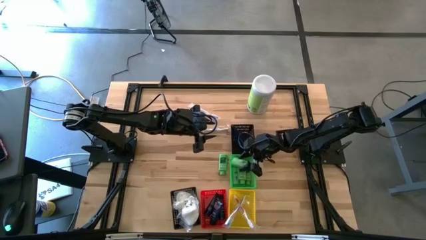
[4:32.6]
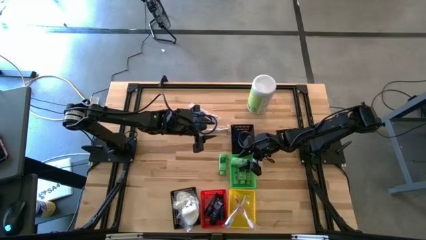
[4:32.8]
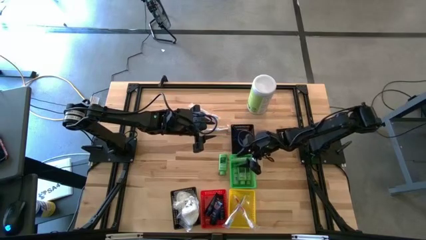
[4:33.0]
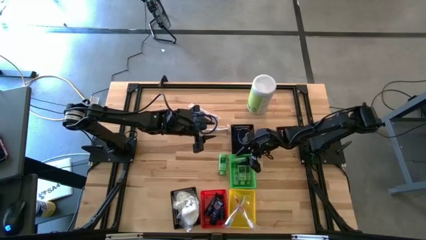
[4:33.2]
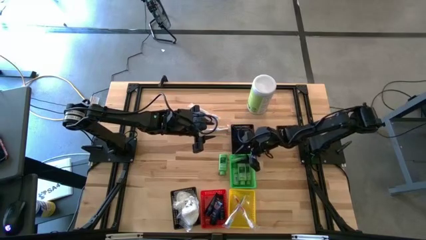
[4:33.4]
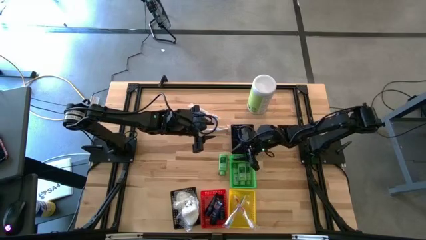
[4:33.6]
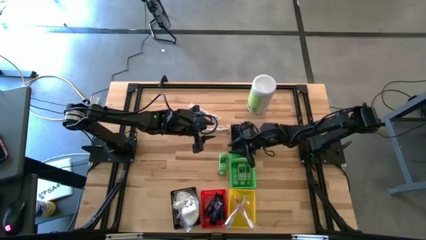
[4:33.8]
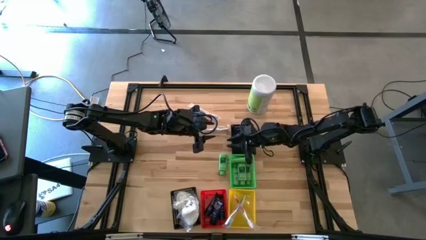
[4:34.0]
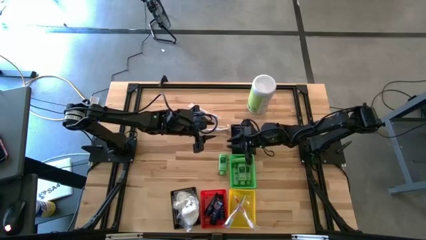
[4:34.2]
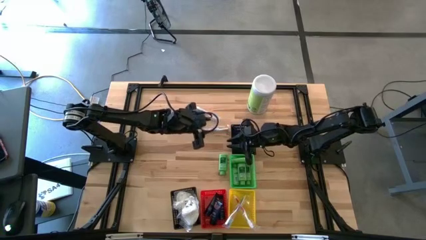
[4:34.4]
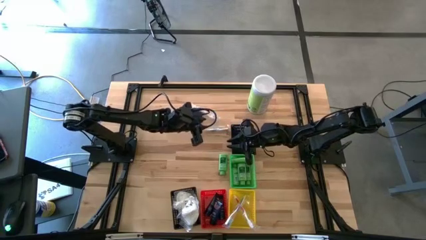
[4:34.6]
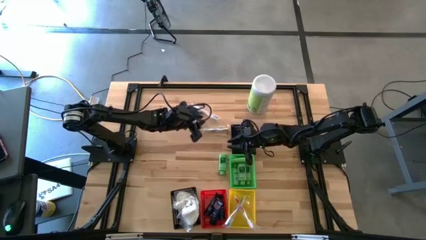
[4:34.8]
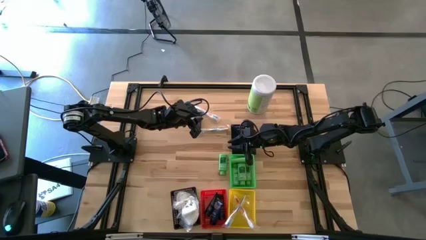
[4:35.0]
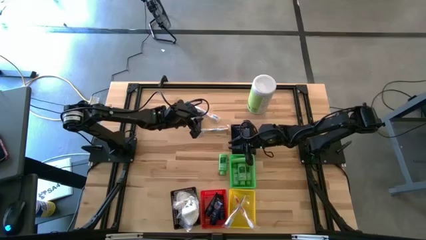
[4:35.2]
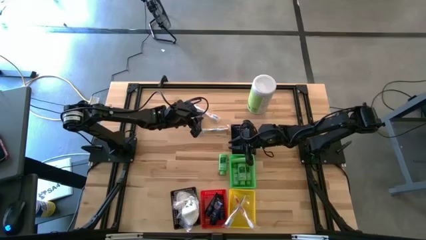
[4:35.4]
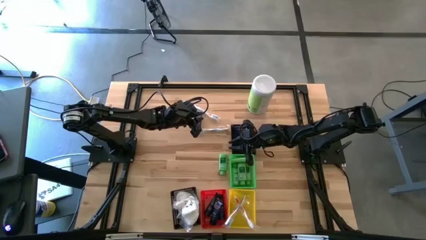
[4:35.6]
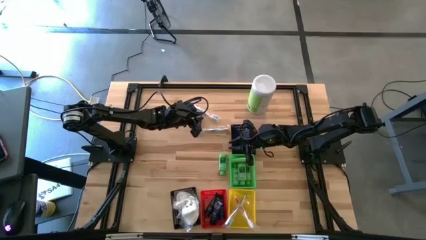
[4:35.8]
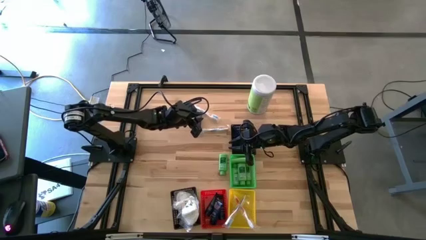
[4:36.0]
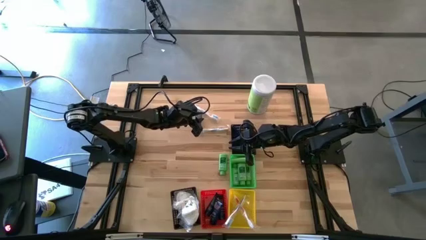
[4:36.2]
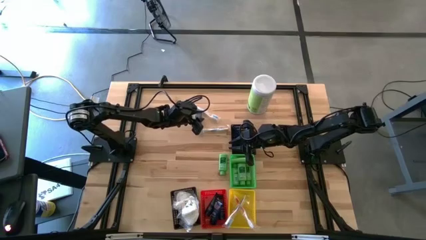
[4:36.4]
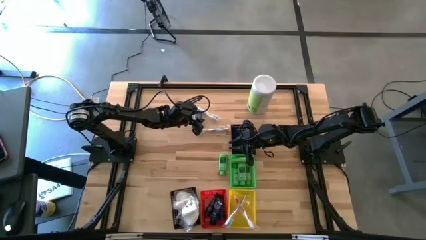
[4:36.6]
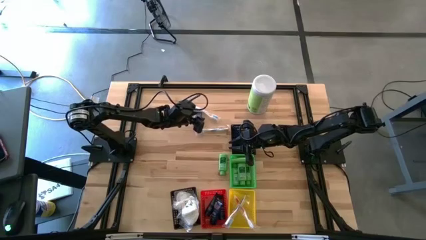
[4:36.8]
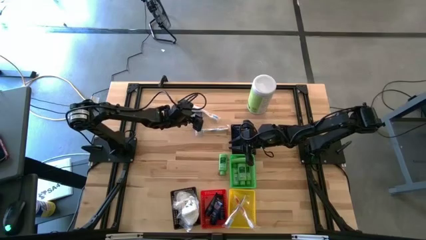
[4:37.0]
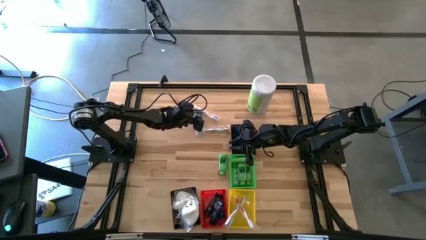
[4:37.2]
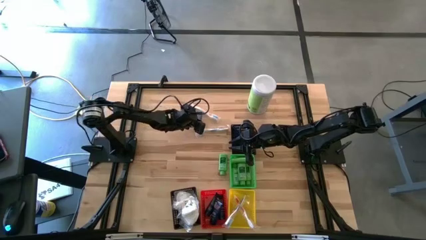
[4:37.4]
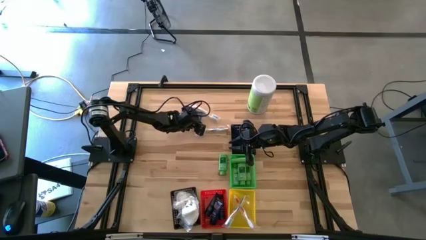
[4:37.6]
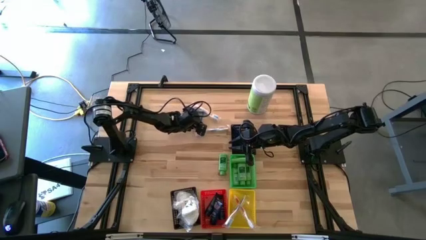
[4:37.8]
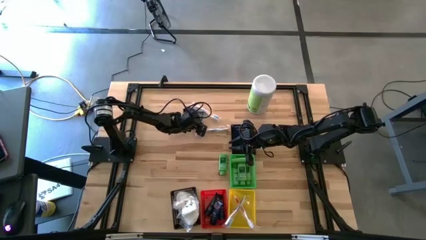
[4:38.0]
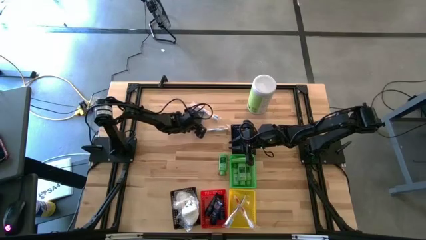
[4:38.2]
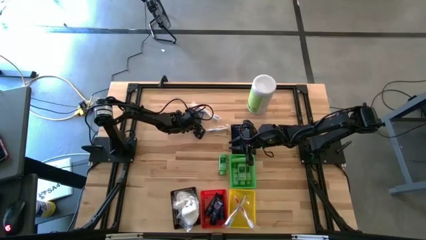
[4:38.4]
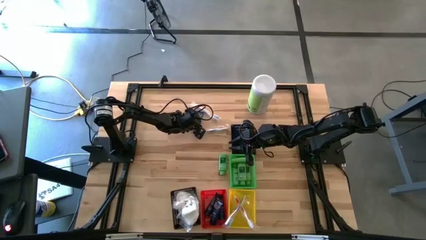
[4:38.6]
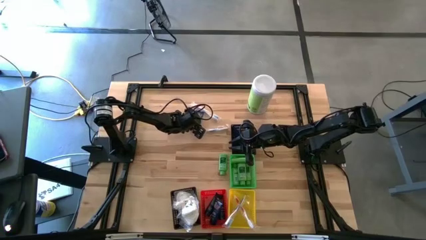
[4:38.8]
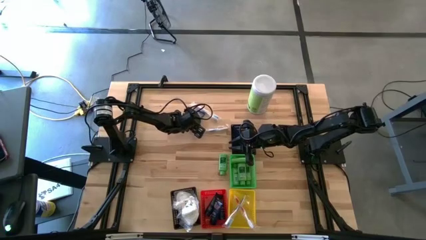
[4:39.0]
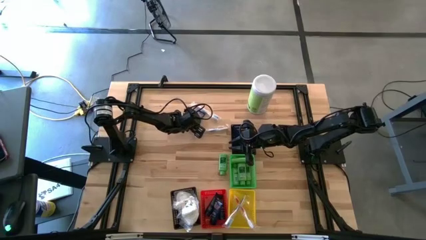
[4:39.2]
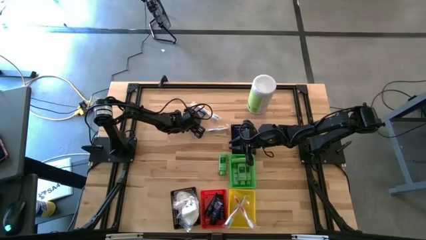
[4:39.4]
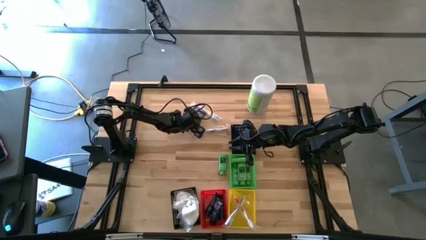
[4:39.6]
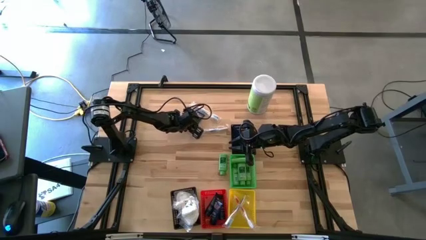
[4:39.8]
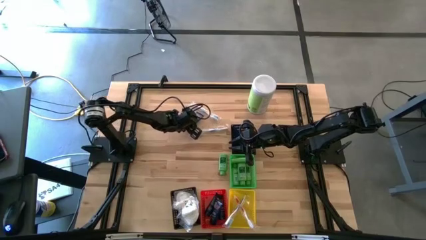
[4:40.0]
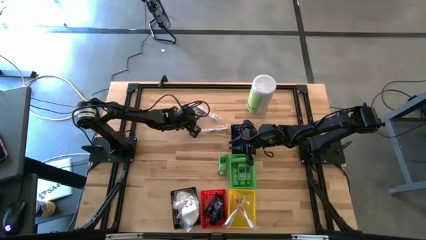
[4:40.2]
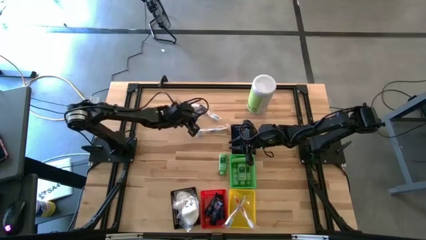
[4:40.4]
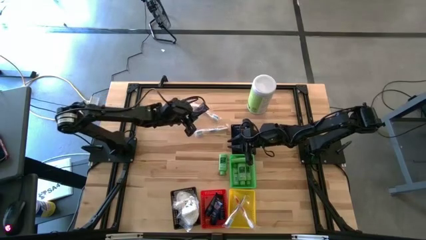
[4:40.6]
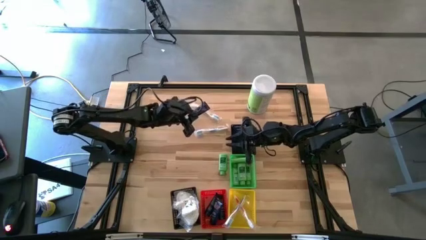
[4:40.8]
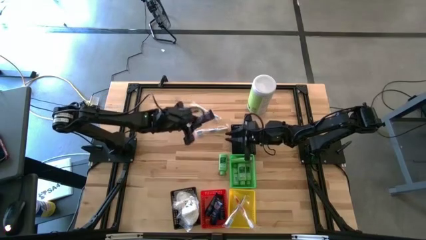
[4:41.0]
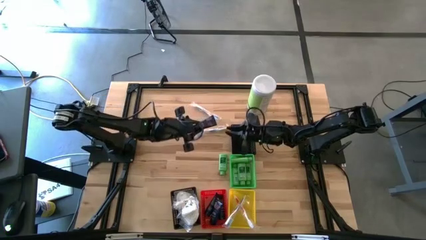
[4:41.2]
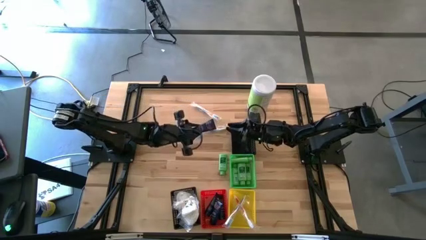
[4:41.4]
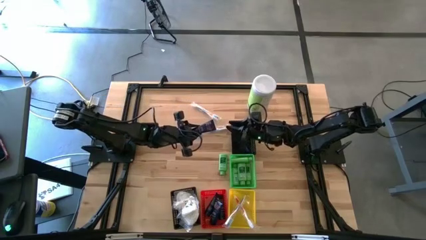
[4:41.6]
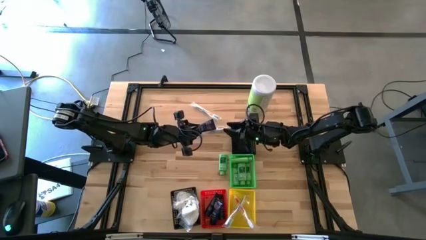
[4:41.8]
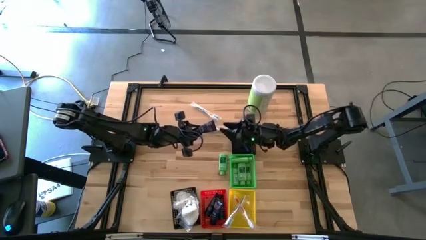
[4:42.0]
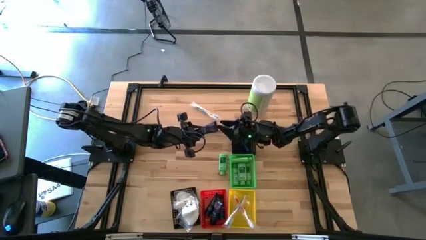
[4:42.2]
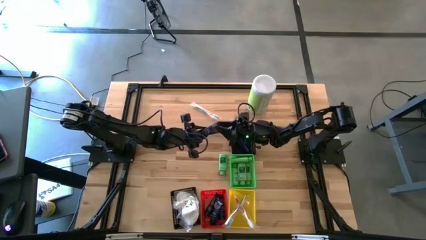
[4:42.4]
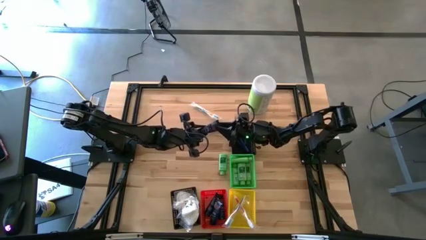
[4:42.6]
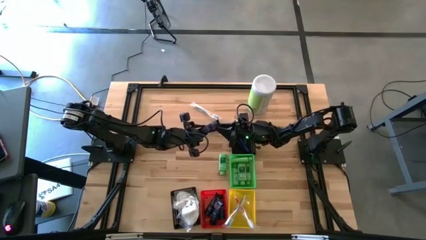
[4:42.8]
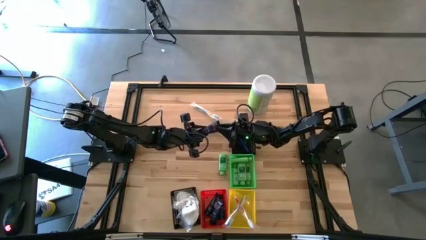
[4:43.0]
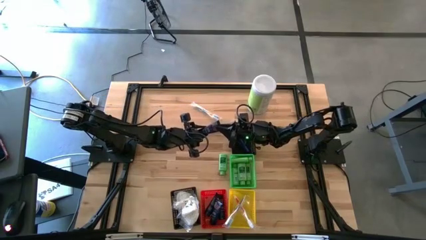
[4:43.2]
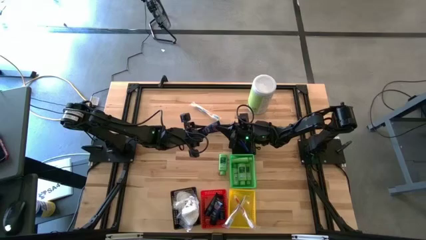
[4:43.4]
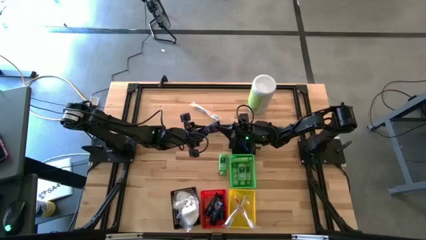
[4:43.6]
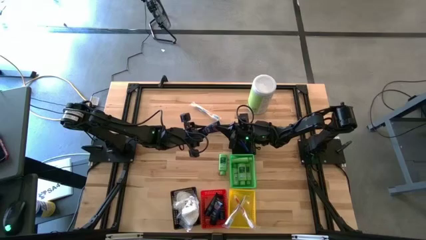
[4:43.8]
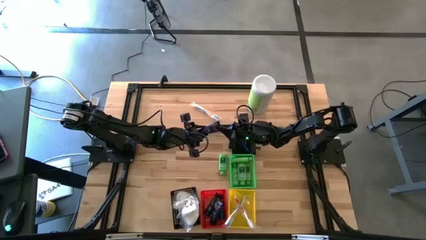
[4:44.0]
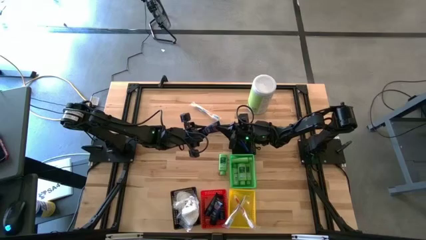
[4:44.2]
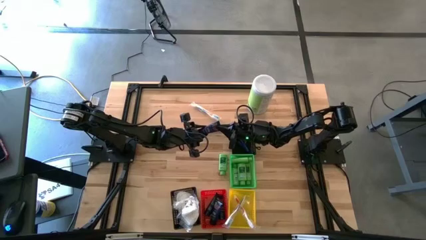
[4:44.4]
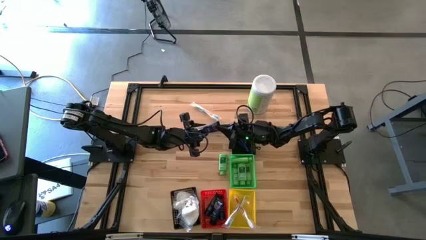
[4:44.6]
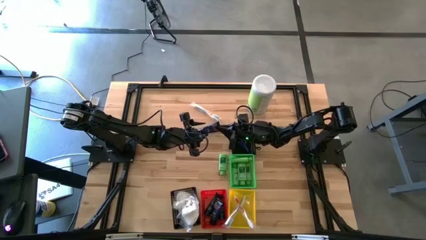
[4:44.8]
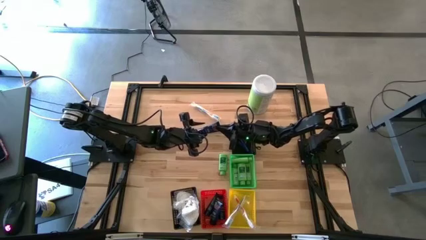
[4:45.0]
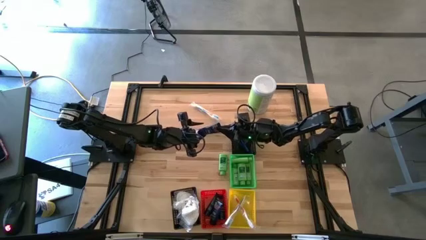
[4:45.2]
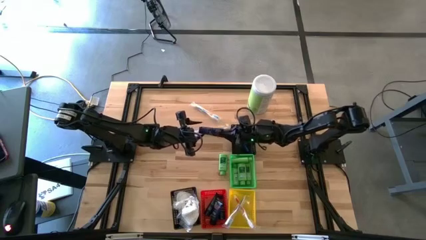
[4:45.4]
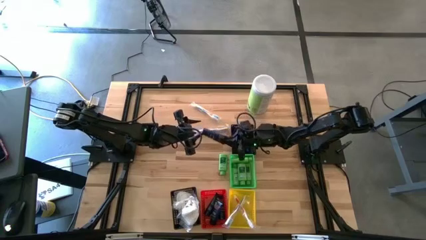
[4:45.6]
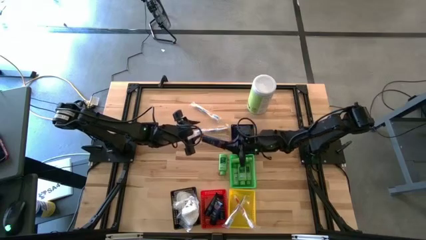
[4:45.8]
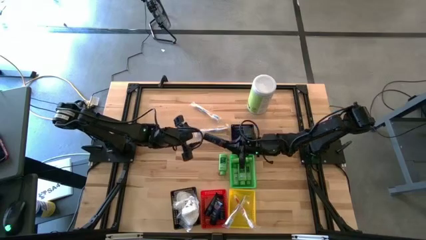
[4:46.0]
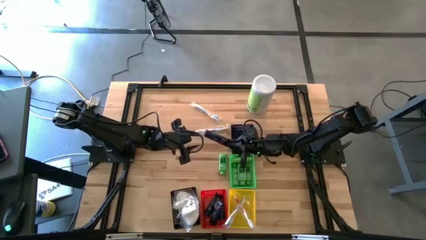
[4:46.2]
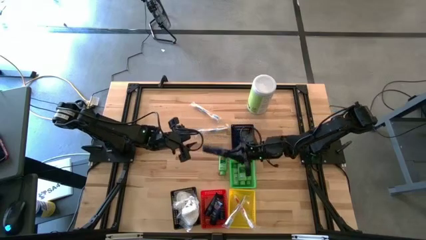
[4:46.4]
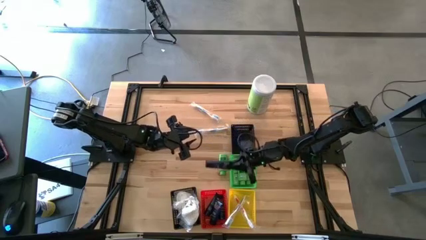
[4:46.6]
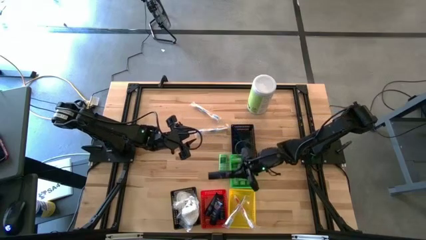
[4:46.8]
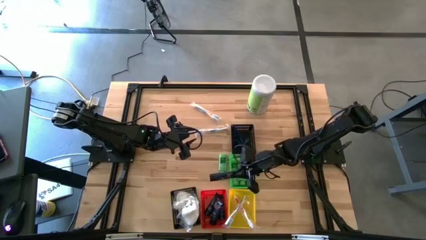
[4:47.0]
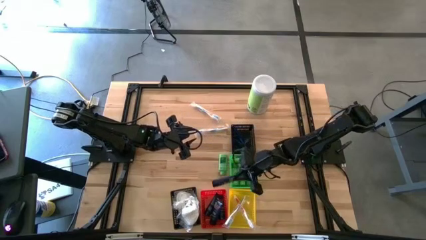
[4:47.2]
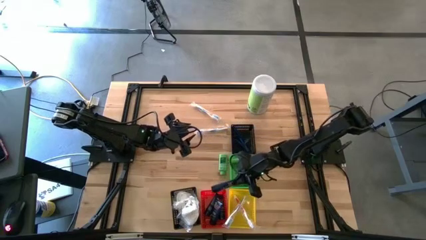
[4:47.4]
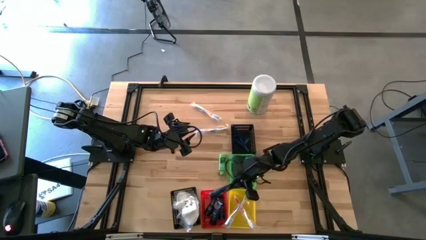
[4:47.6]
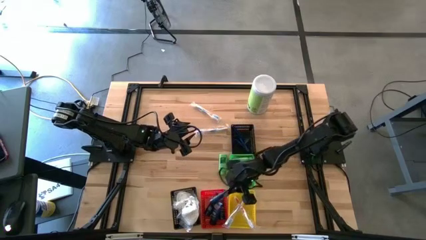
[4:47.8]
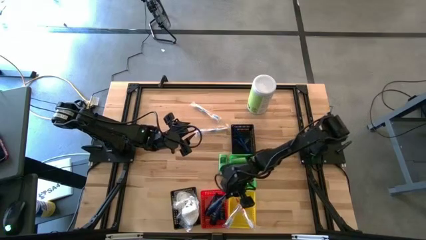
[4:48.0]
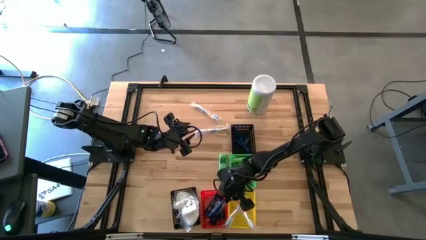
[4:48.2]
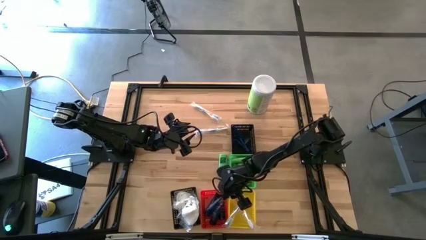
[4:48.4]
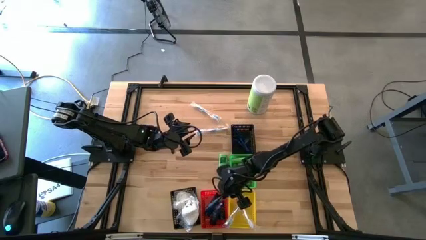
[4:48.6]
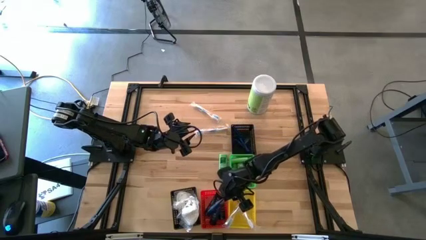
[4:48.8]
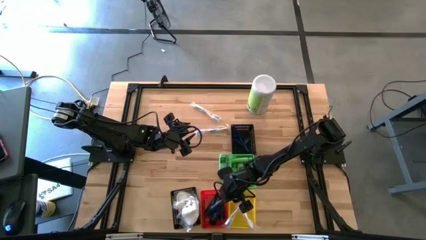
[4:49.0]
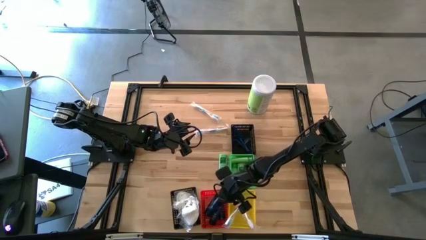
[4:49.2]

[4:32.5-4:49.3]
Task: Pick & Place Travel size toiletries
Put the blue shave cream into the red bin

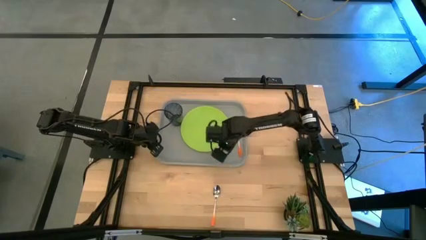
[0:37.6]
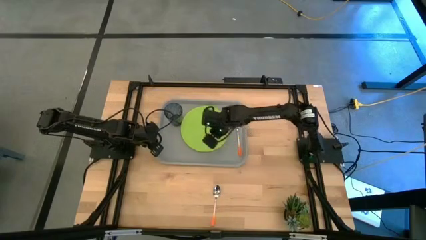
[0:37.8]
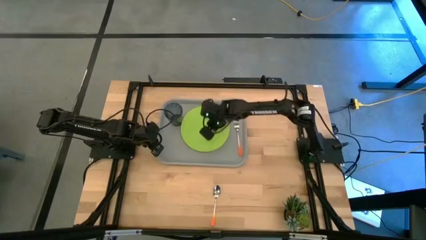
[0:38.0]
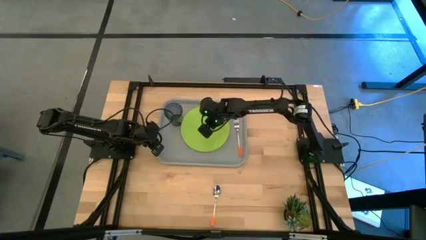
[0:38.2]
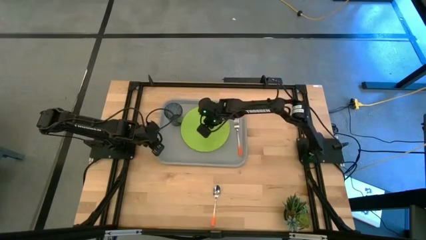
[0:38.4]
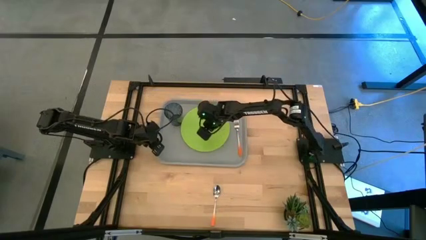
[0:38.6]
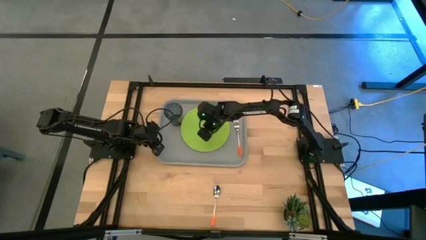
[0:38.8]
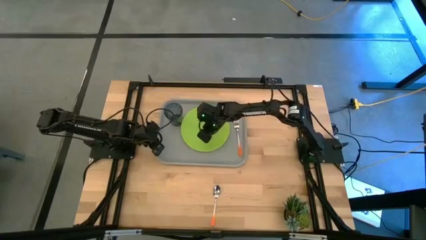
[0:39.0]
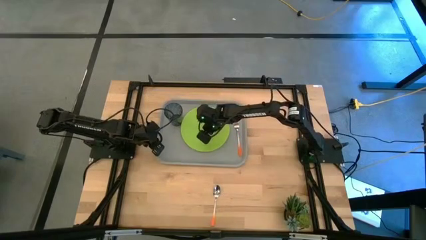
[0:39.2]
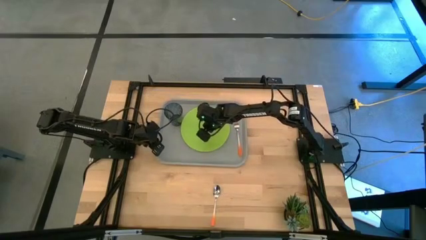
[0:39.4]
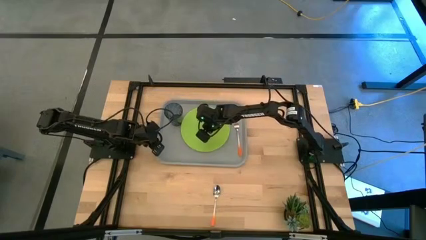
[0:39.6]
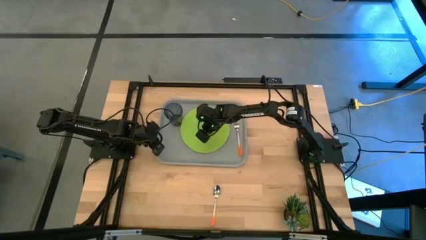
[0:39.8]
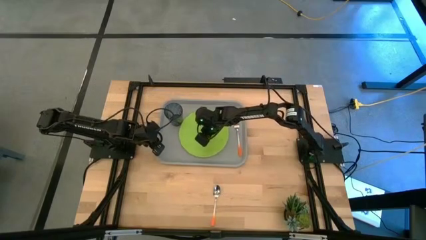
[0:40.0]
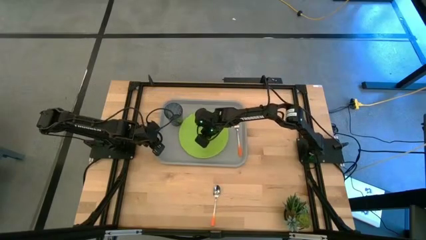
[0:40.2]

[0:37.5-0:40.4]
Task: Pick and place plate/cup/fork/spoon on tray
Adjust the green plate
